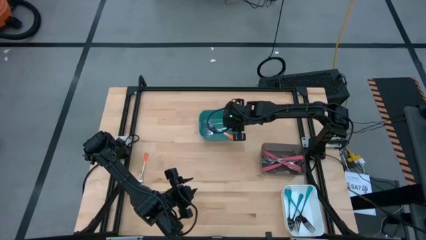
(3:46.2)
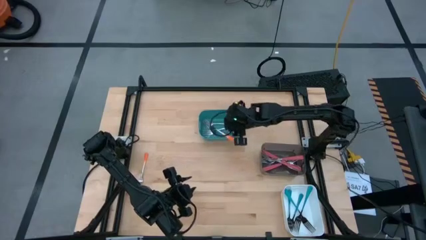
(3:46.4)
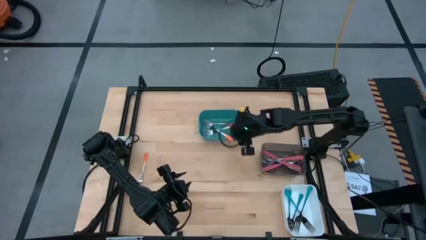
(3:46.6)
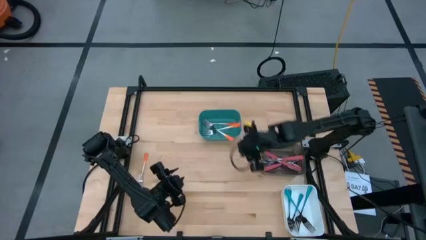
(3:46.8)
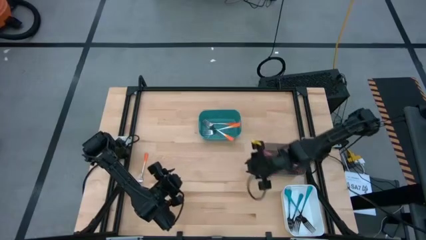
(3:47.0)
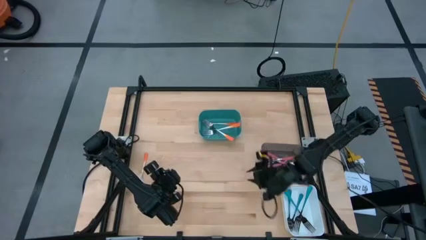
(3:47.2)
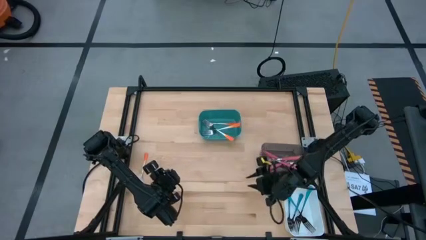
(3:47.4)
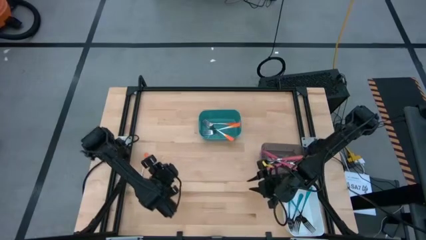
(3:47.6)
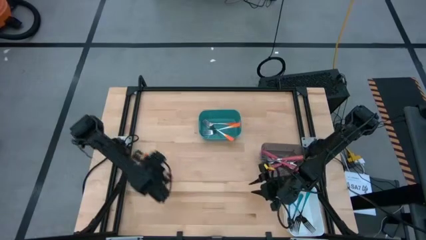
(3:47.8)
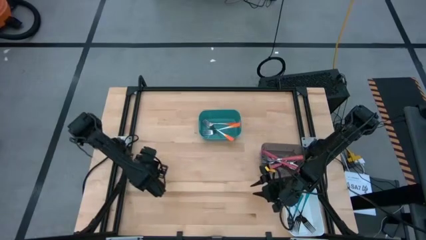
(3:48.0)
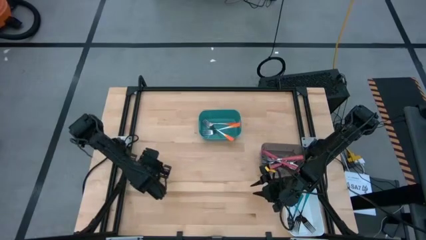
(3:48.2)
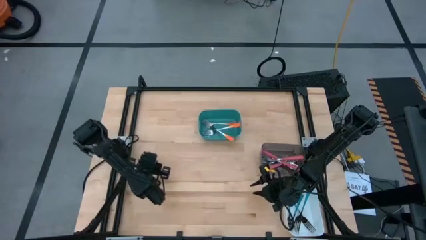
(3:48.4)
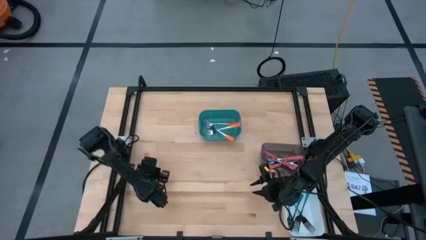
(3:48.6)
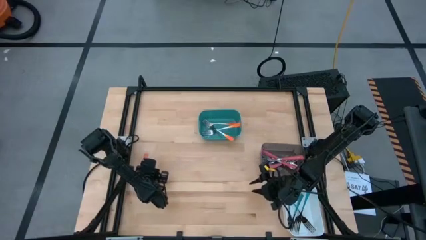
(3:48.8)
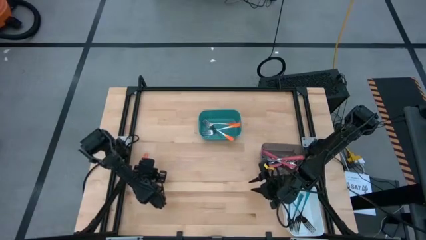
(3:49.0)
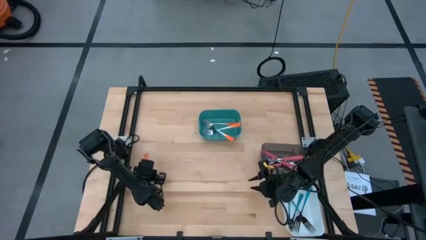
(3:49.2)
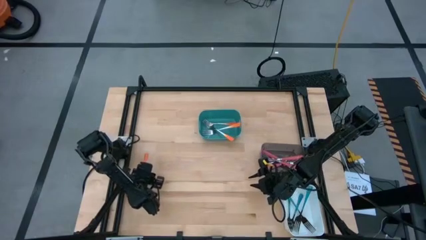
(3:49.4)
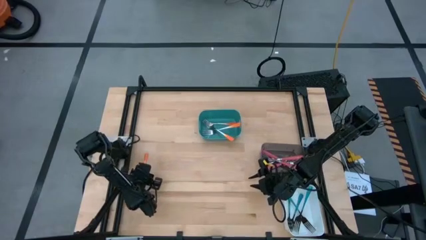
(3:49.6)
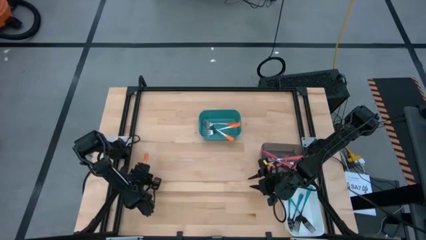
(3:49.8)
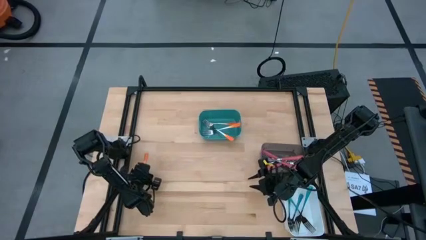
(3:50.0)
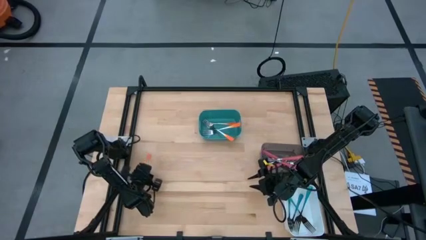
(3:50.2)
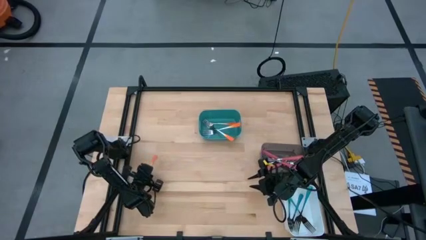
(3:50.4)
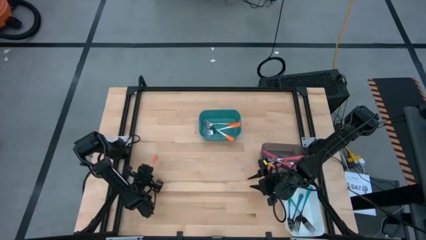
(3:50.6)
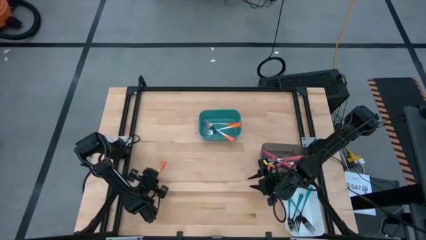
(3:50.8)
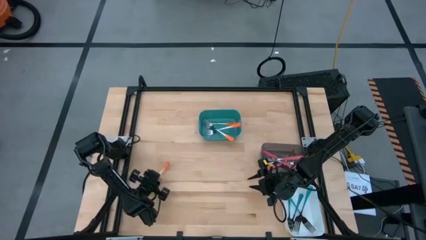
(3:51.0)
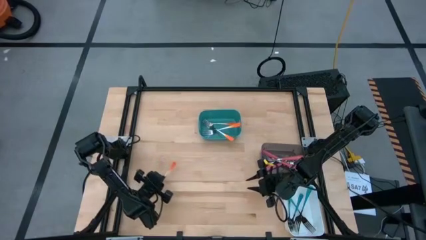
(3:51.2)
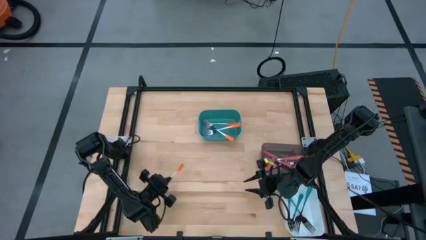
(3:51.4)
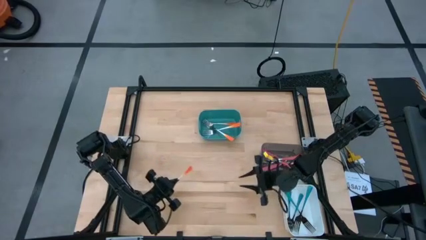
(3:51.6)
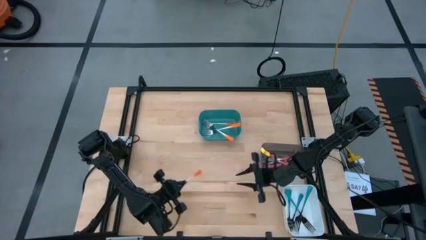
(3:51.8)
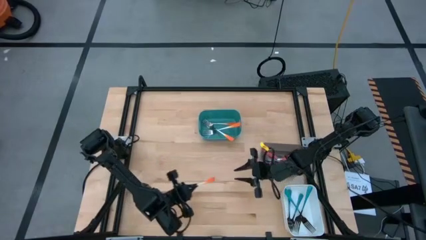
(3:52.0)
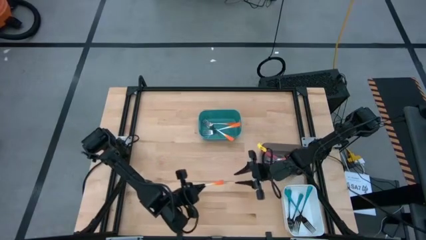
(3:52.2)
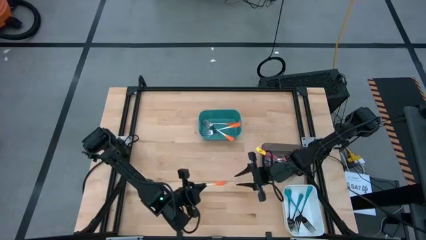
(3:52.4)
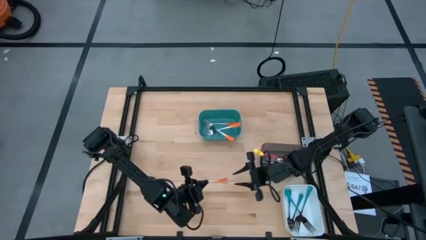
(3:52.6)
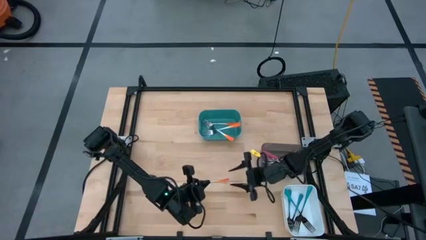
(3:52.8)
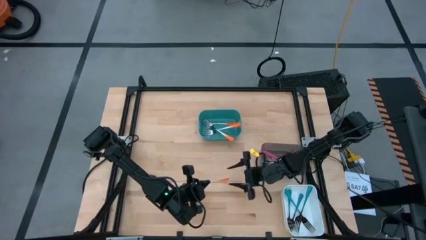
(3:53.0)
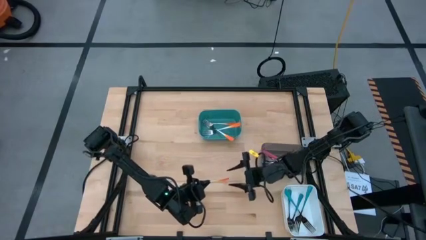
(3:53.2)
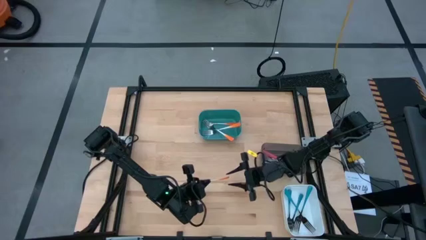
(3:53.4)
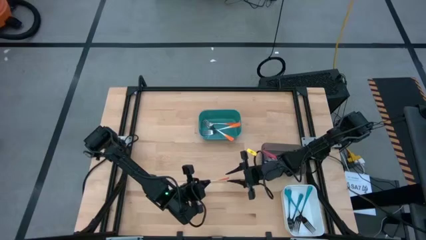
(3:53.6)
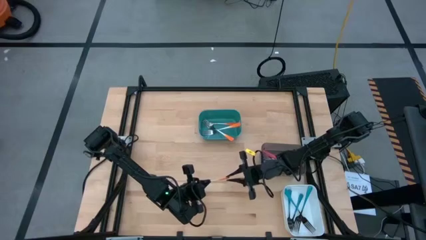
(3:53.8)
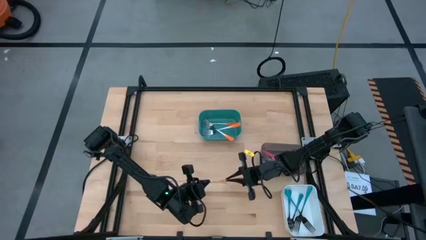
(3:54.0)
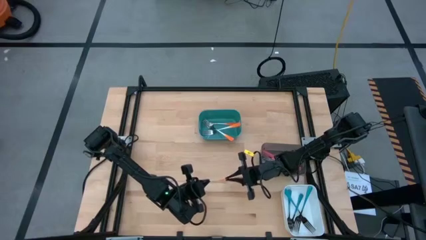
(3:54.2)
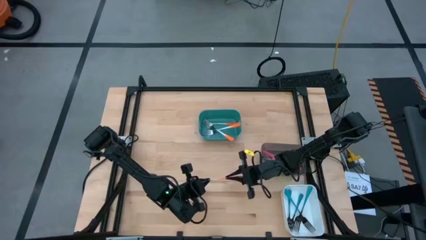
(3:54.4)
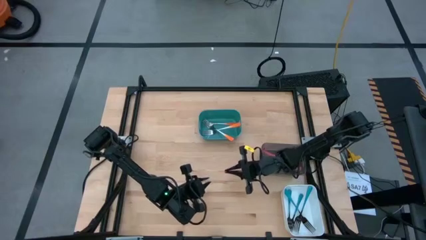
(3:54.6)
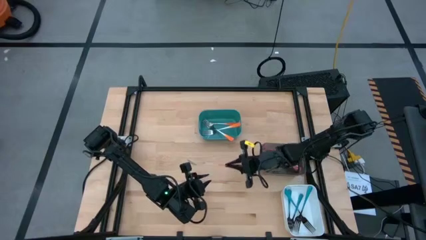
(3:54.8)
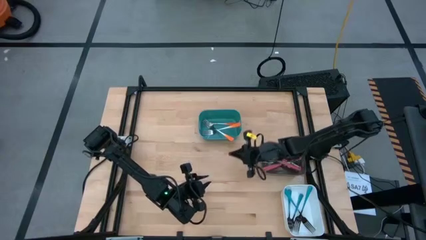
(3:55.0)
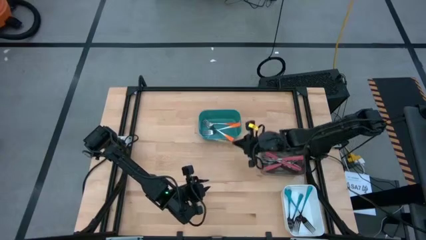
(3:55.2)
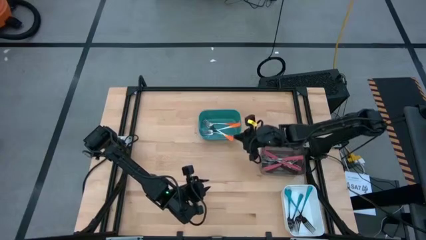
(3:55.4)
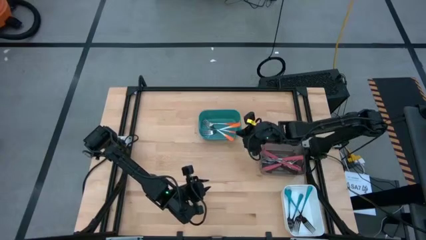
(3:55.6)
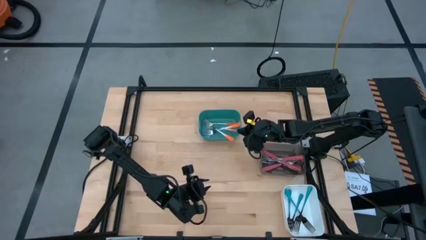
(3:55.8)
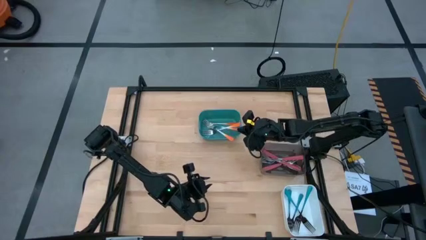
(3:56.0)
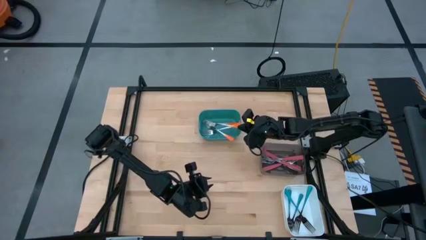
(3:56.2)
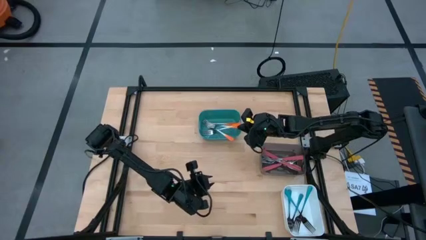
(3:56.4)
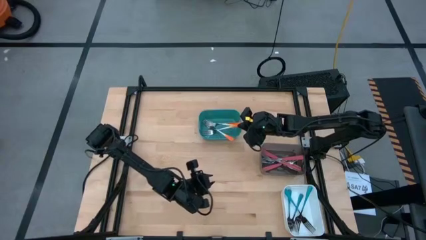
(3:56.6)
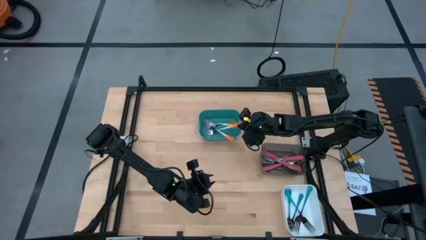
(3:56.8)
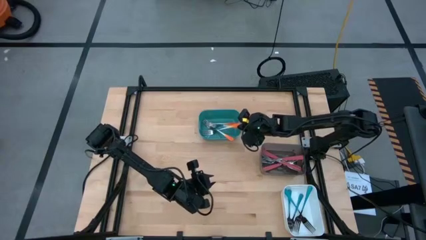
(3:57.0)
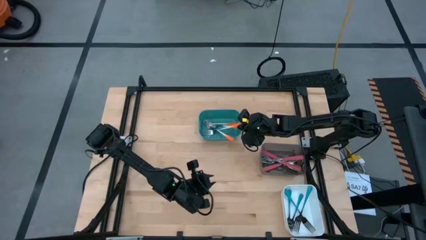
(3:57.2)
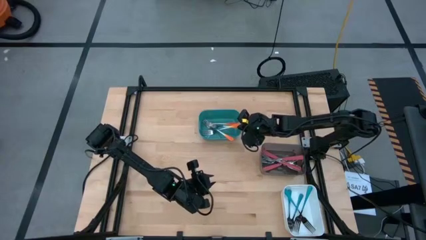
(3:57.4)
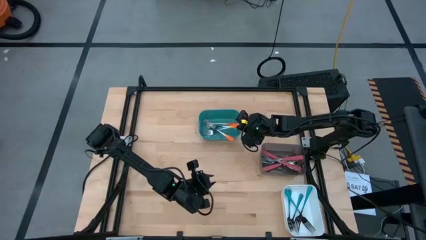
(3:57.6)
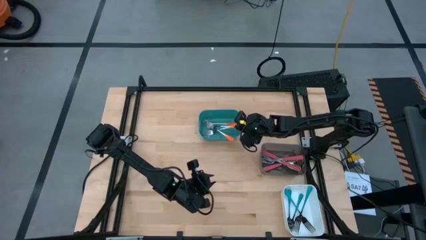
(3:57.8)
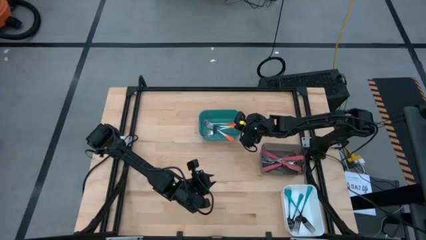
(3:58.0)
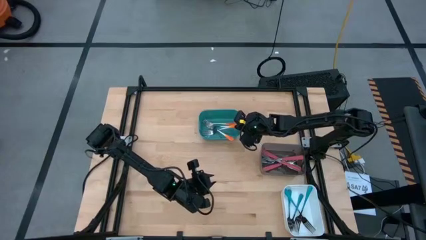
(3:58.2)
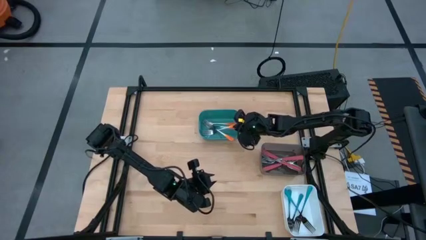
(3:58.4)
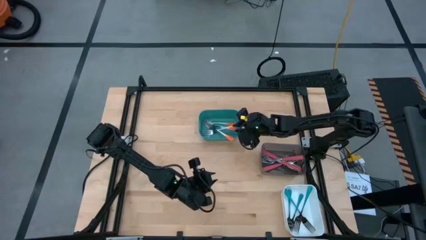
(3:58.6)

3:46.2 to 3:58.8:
Task: Sort silverware by color (type)
Put the orange fork into the blue bin

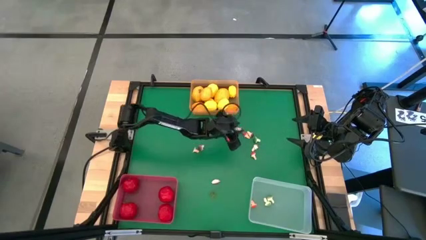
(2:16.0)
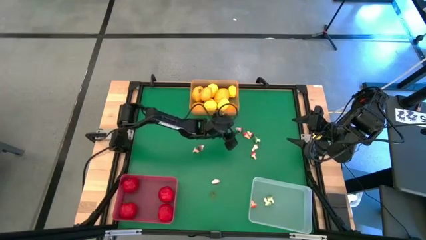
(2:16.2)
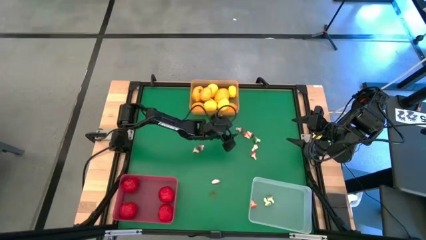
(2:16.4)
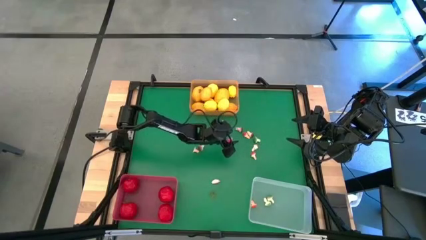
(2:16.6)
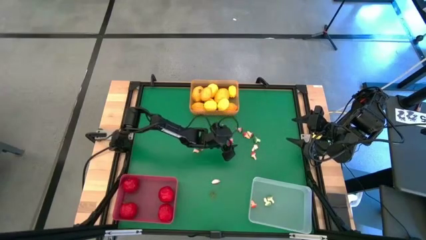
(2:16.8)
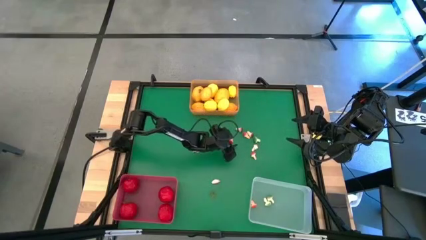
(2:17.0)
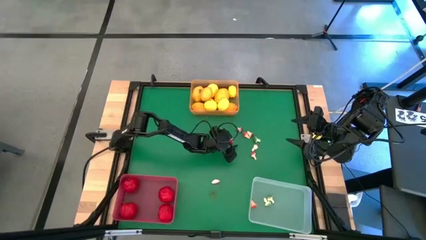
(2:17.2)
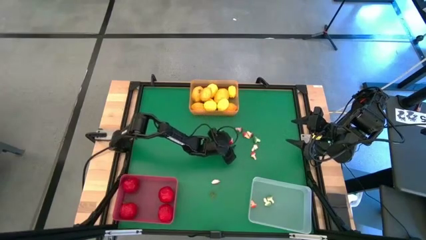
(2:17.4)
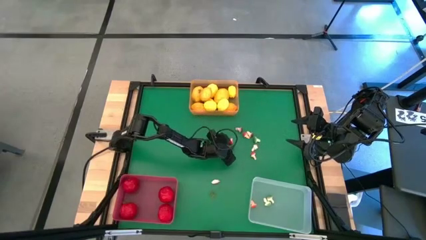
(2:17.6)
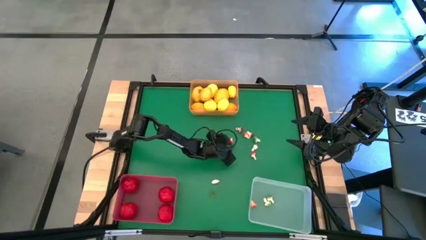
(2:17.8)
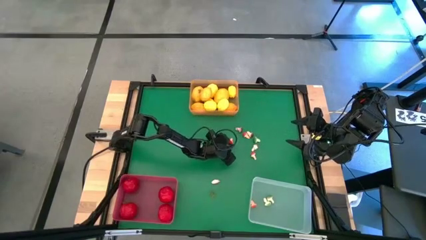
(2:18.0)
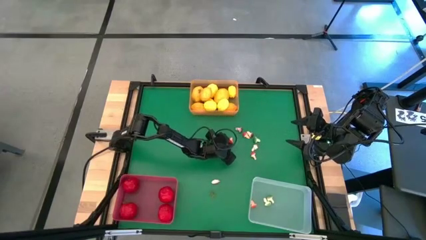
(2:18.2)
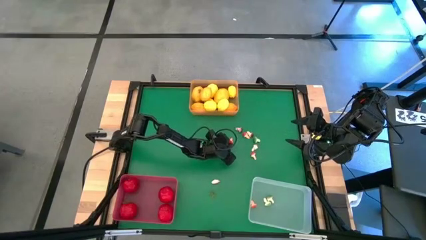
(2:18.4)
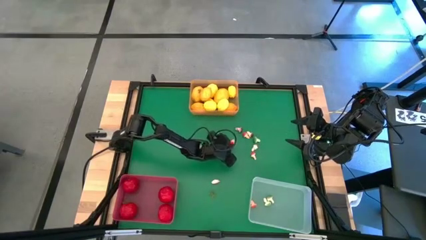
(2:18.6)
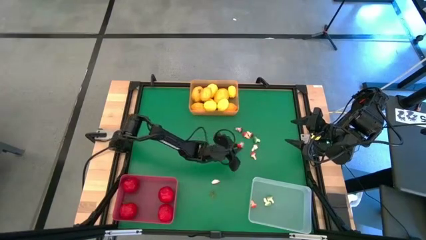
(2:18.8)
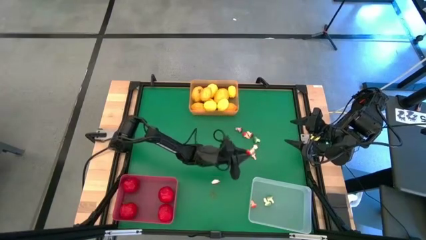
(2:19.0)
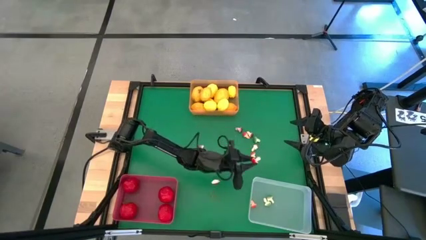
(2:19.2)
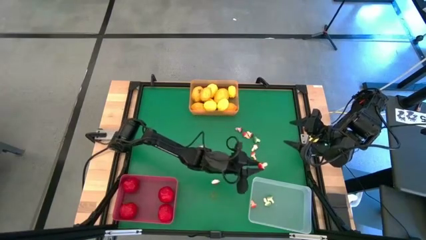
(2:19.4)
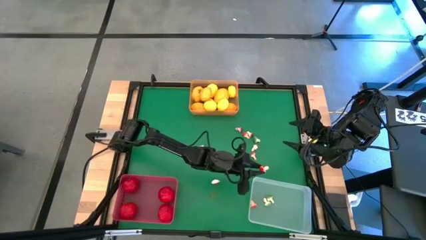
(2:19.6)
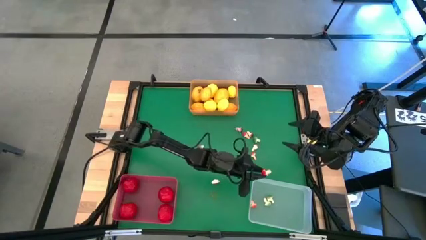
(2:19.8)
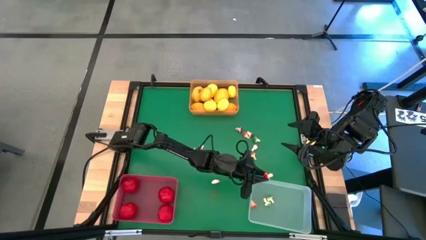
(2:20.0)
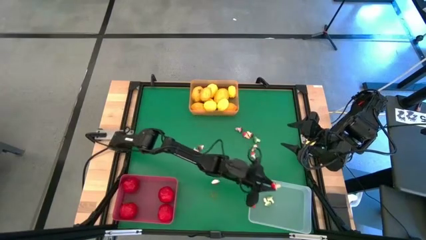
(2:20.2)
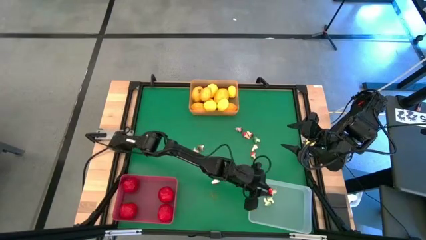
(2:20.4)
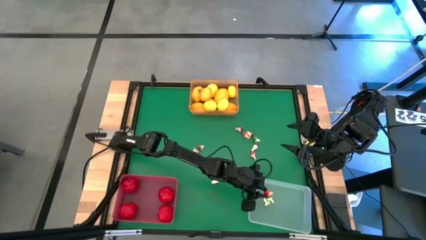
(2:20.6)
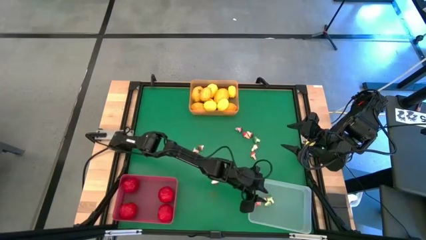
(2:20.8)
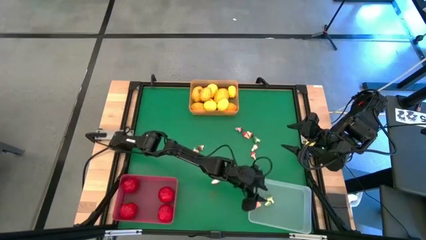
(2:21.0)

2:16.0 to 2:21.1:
Task: Sort produce into baskets
Put the red mushroom into the transparent bin
